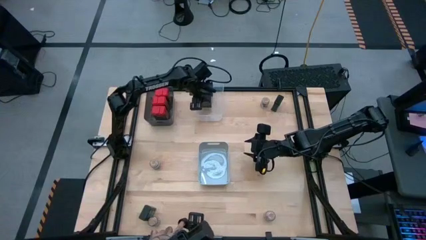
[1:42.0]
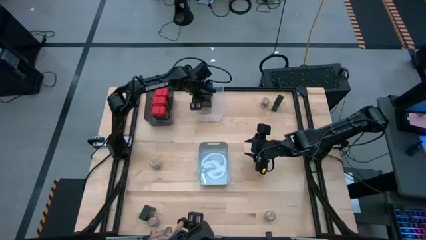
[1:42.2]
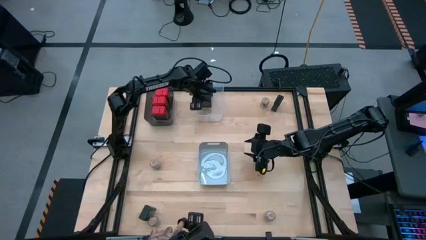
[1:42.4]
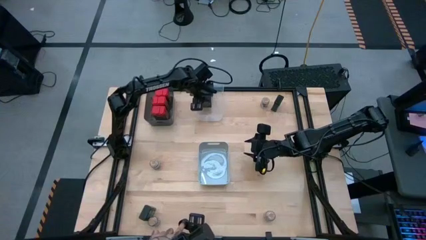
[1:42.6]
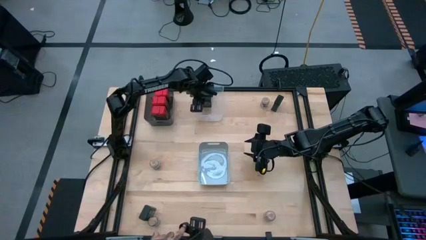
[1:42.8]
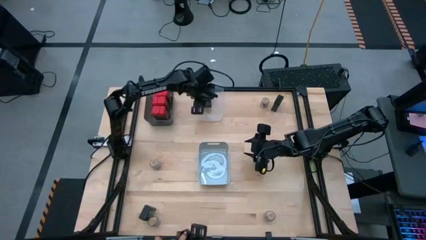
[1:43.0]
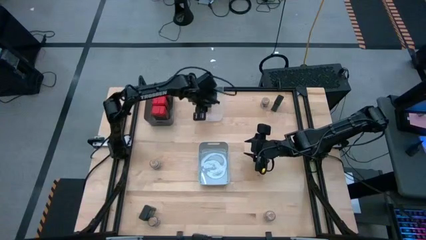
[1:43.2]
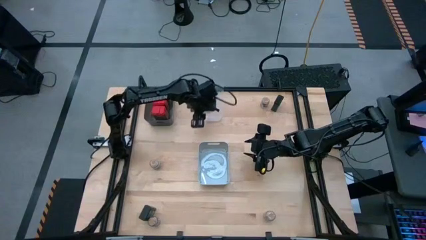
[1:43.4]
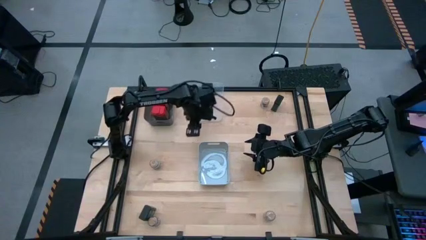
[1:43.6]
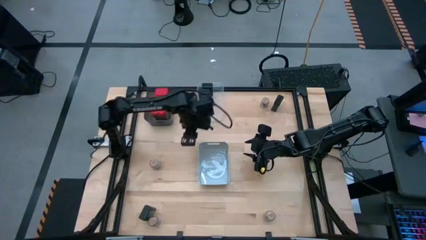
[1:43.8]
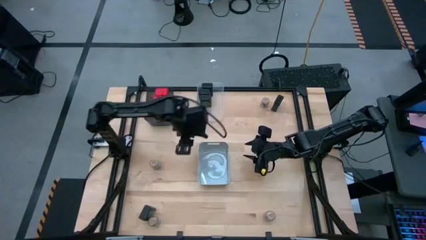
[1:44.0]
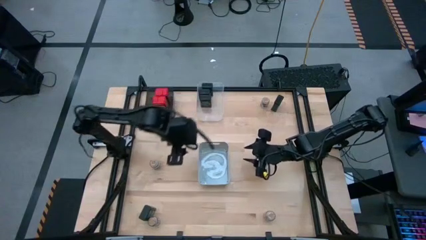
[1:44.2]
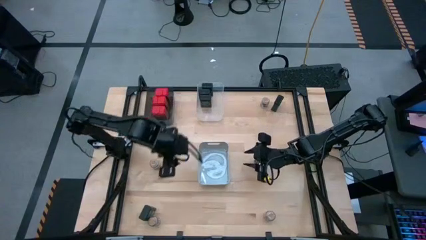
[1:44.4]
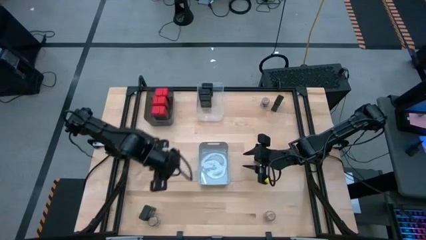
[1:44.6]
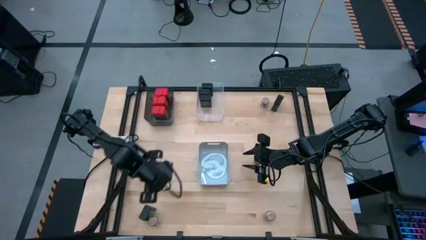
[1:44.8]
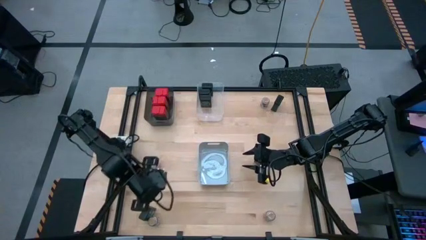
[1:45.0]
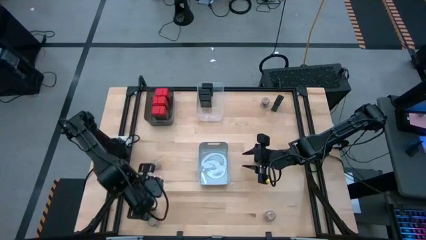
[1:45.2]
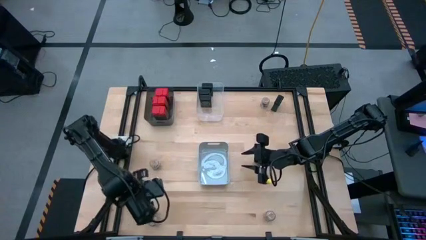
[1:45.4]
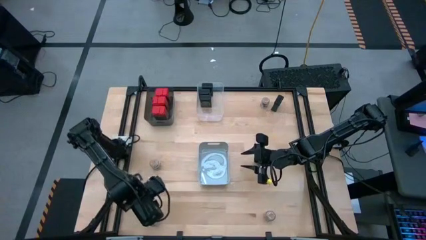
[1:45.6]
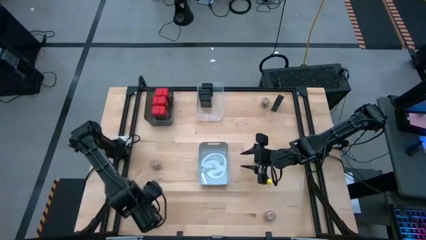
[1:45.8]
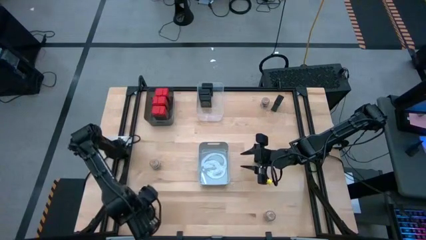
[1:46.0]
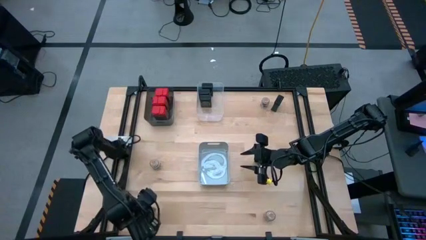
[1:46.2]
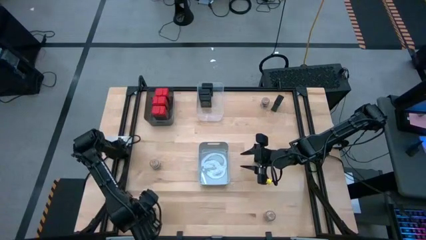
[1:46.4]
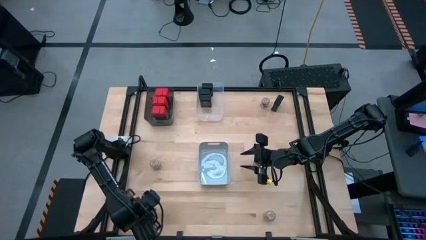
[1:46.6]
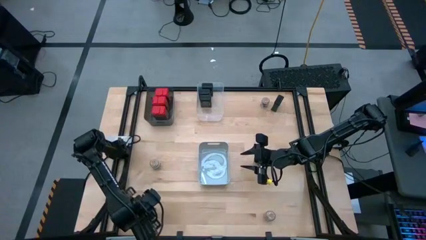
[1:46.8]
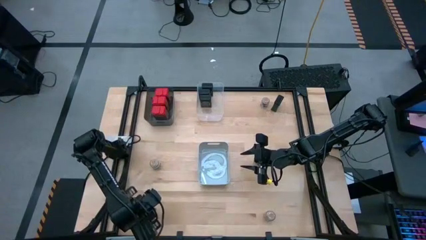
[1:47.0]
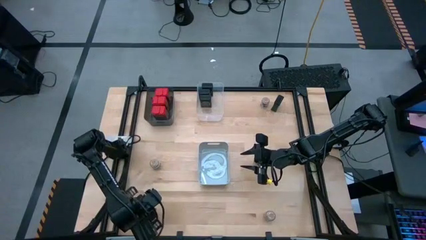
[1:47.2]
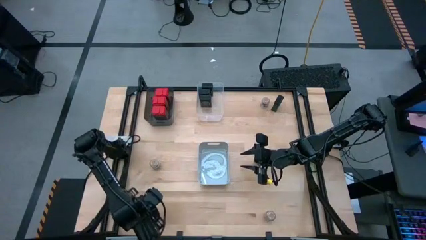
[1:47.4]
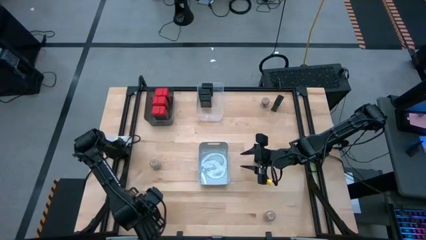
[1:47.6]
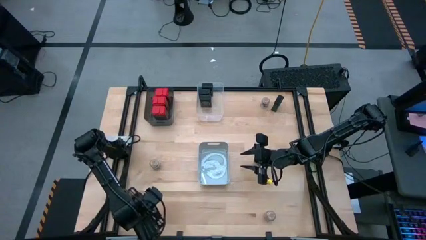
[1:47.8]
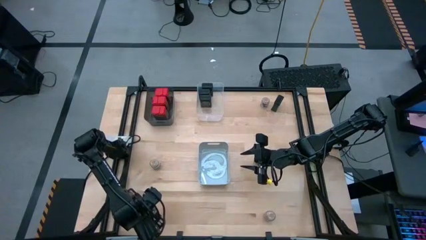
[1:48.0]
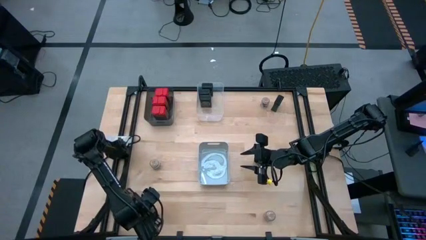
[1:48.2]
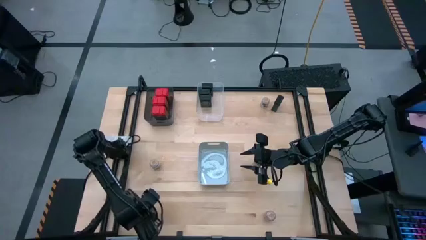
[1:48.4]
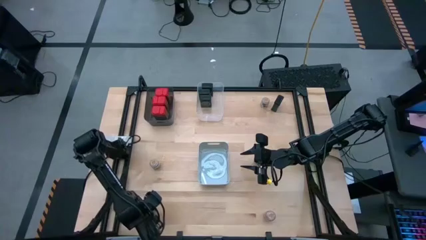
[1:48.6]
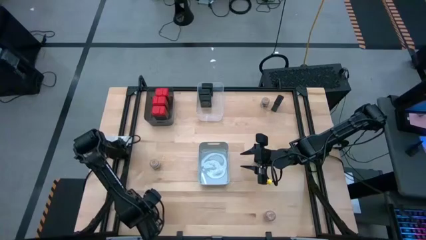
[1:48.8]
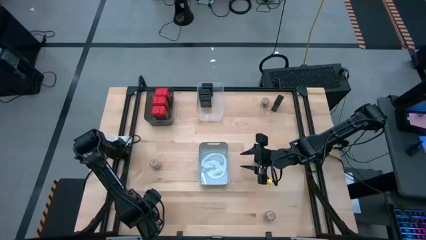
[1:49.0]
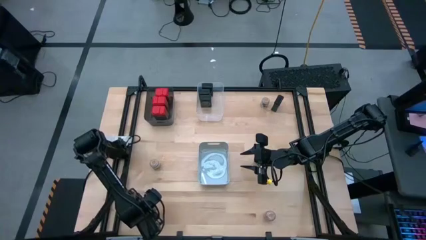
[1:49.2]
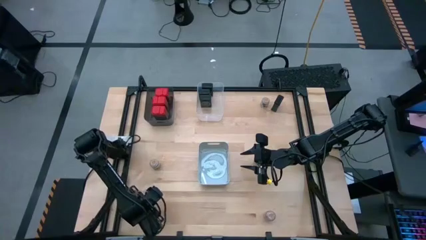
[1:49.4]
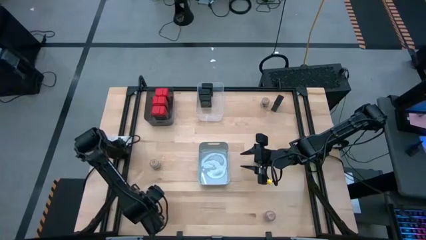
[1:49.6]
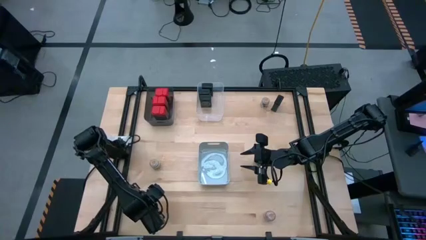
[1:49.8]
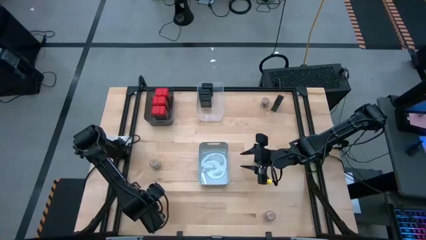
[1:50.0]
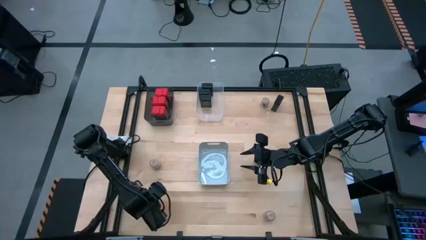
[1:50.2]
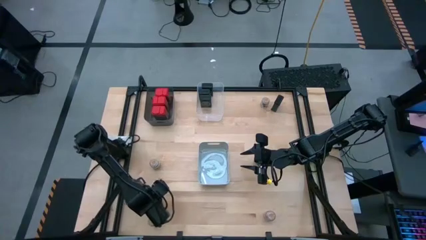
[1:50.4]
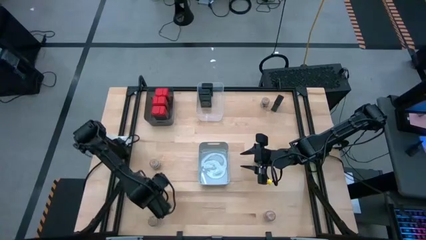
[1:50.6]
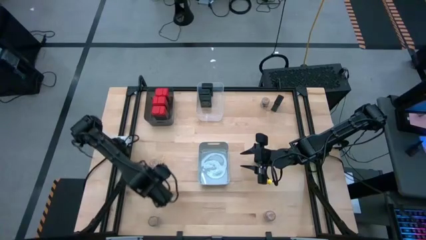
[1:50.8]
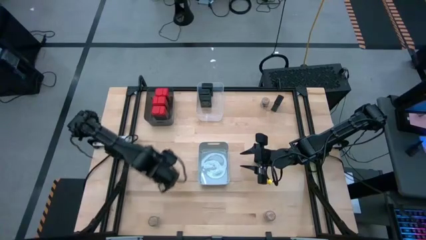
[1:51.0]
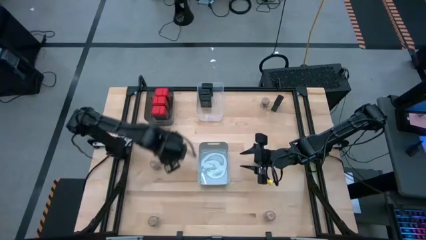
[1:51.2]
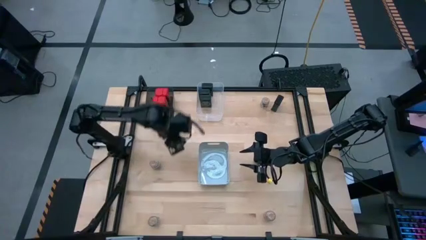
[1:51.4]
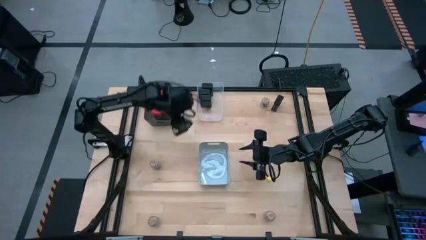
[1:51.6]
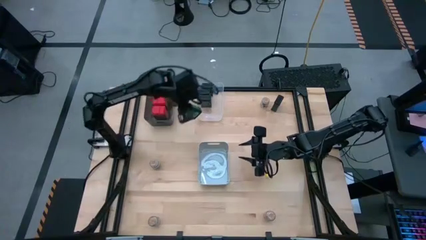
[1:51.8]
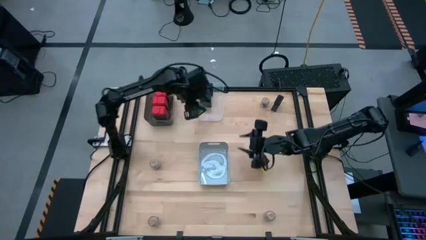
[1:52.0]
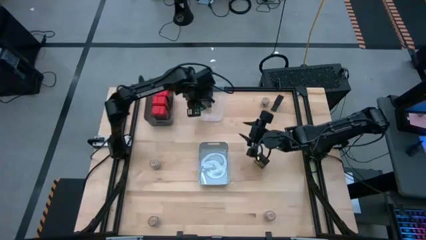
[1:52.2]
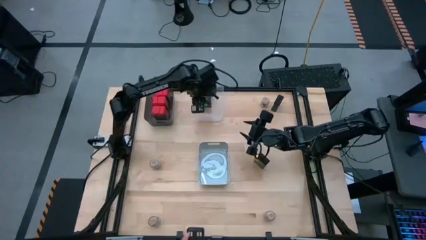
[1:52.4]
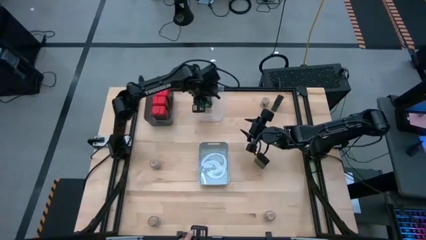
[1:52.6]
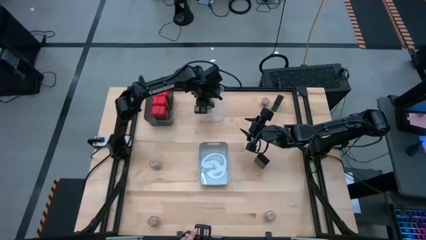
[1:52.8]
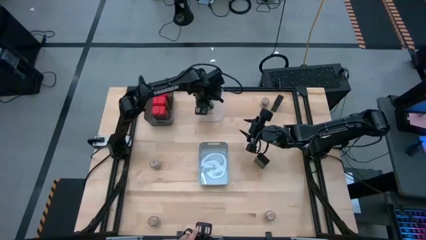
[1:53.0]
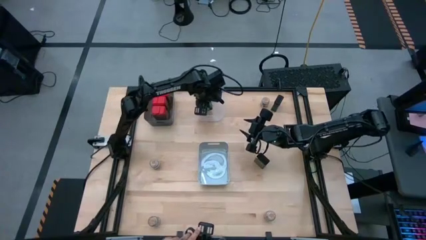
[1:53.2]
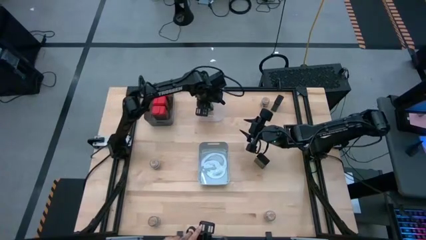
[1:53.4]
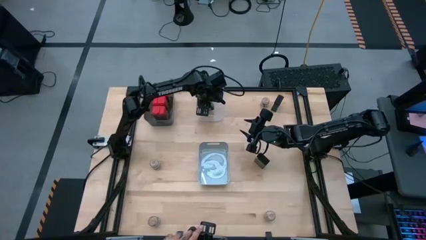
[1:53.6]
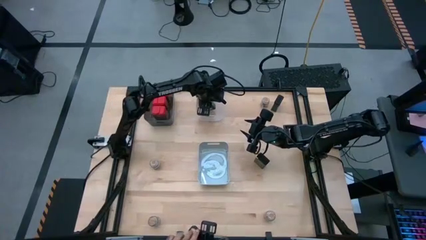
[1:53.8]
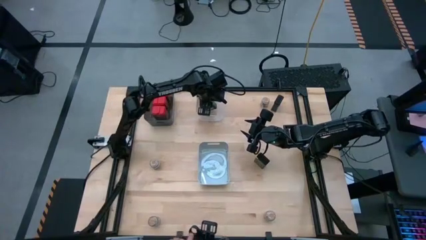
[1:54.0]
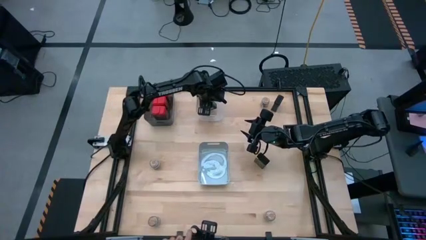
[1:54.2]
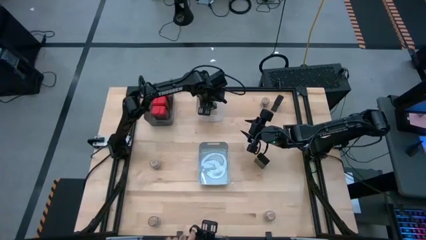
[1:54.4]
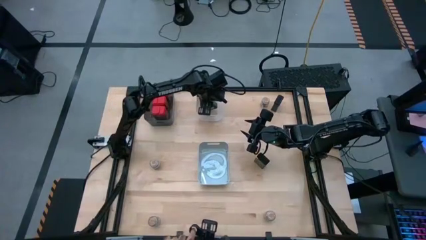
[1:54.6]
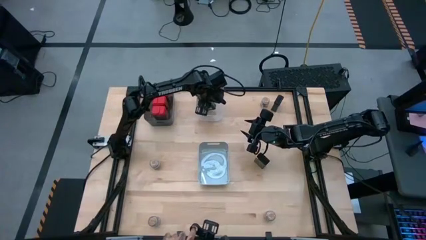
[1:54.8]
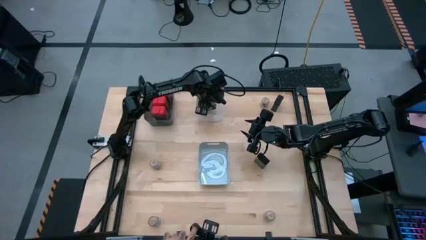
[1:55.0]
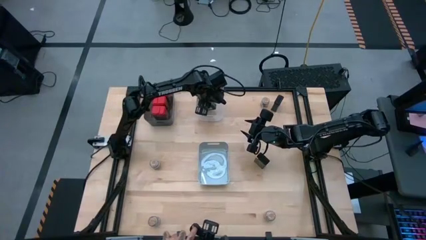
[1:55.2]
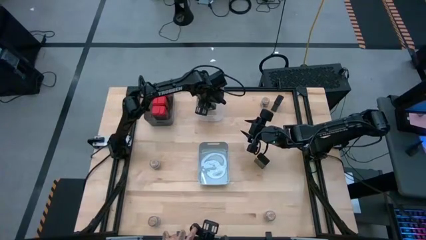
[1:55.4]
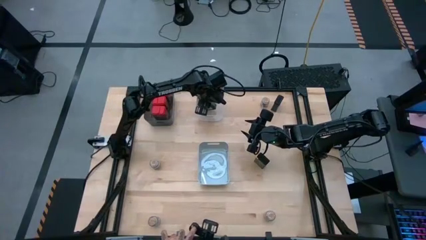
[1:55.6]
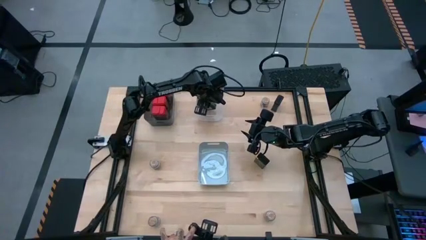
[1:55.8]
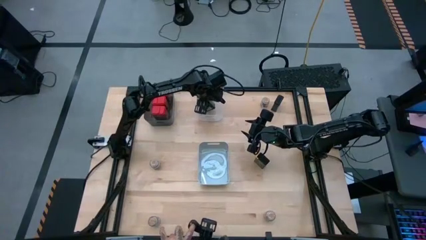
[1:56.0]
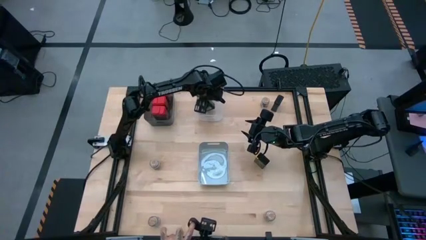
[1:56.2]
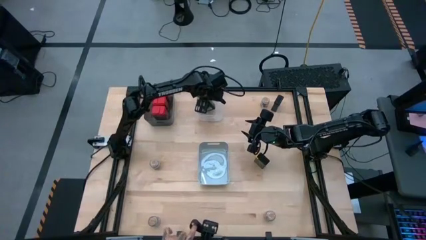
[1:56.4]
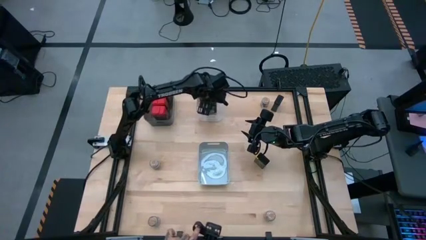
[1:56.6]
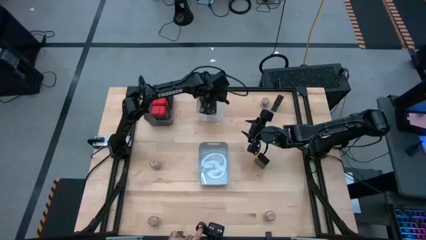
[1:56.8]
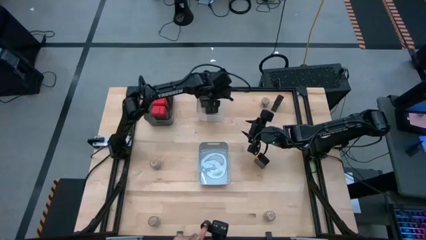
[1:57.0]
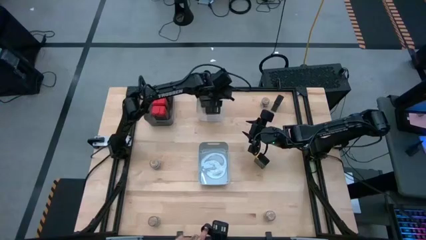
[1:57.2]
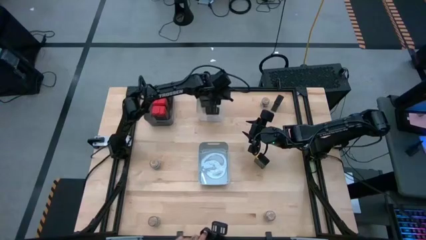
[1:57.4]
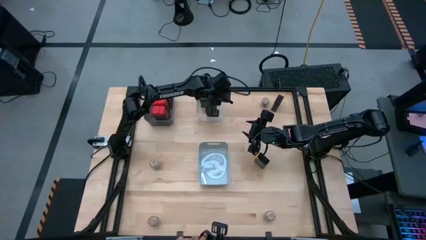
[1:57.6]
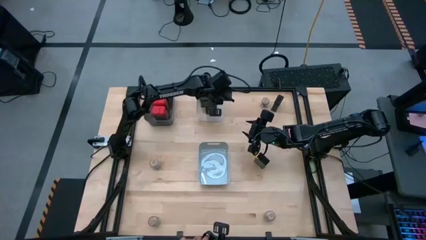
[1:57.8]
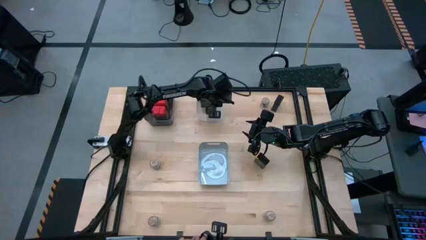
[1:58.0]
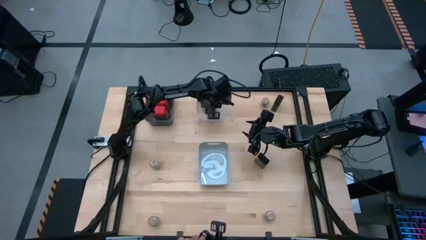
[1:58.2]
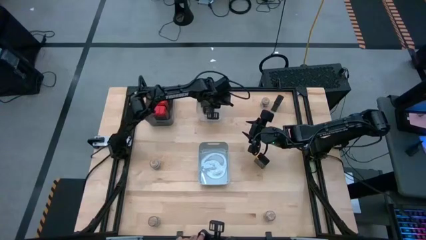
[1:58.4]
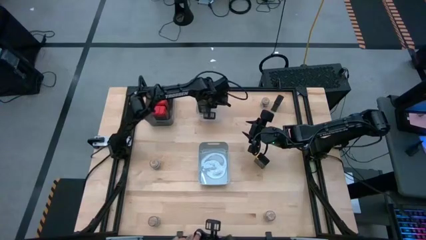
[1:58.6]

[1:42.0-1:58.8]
Task: Sort spices by type
Put the black seasoning can into the transparent bin
